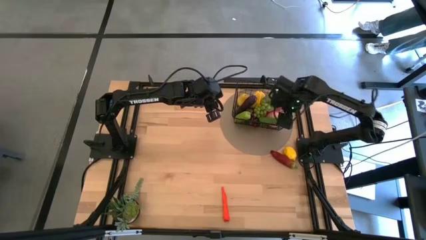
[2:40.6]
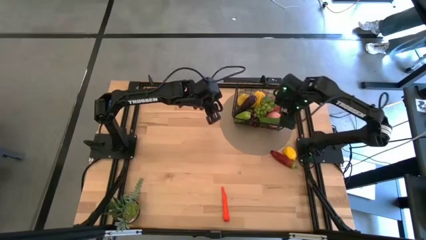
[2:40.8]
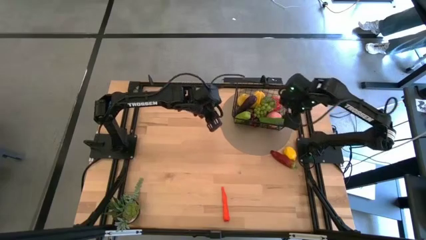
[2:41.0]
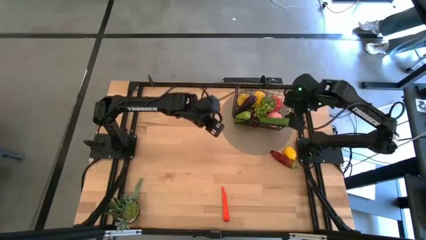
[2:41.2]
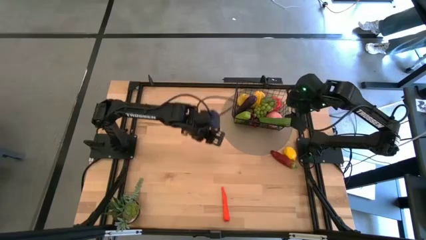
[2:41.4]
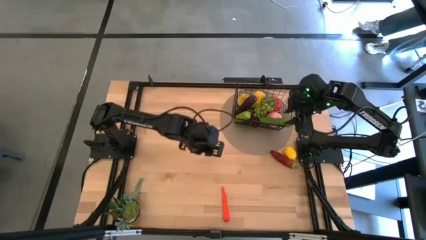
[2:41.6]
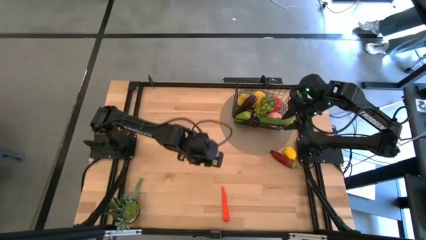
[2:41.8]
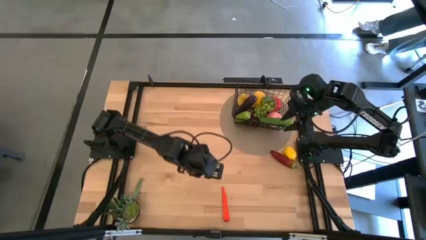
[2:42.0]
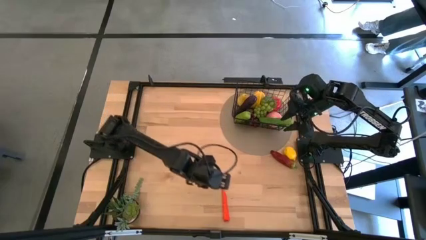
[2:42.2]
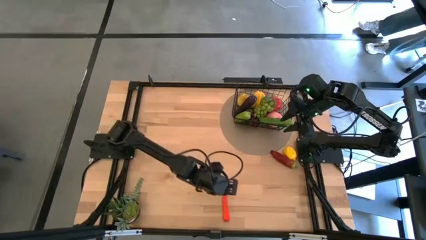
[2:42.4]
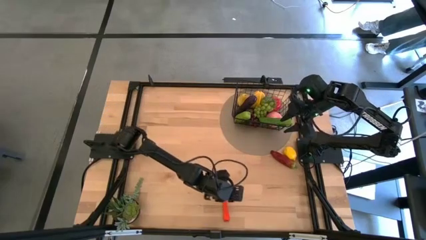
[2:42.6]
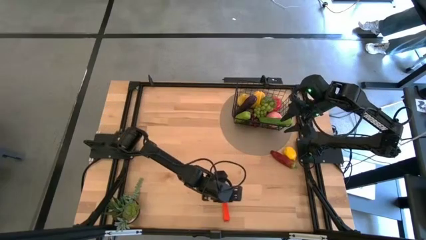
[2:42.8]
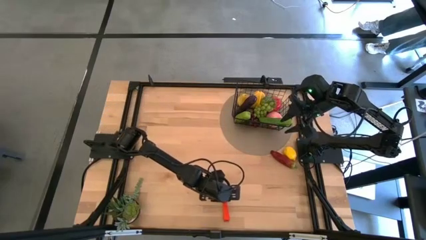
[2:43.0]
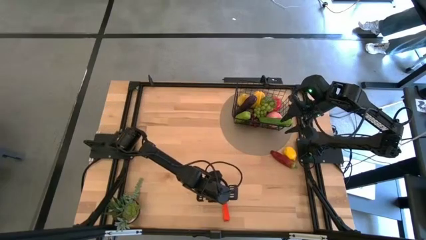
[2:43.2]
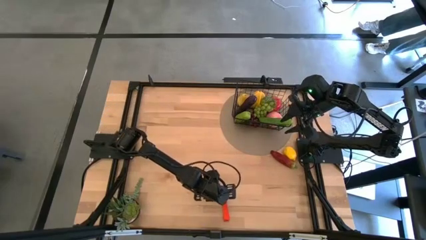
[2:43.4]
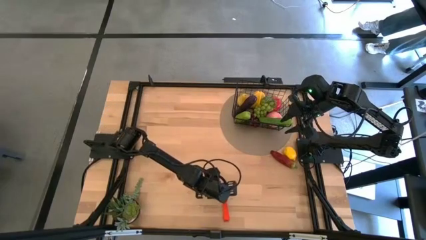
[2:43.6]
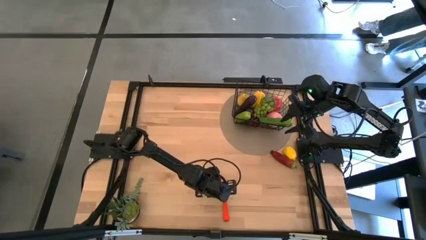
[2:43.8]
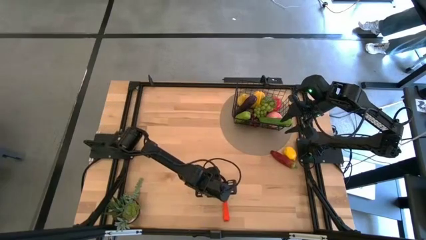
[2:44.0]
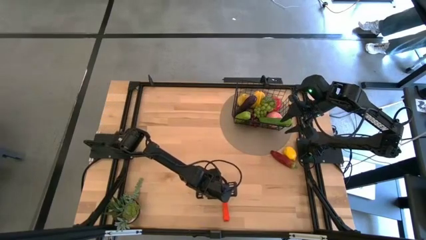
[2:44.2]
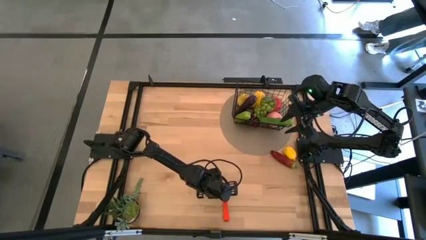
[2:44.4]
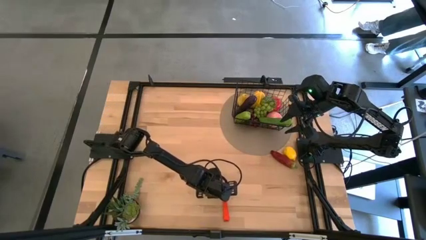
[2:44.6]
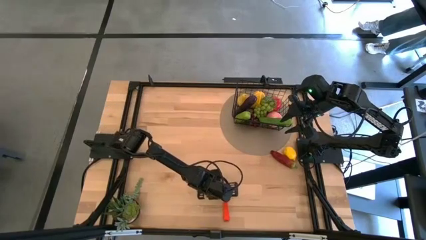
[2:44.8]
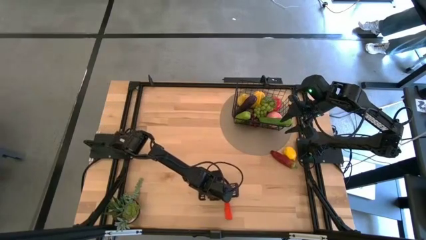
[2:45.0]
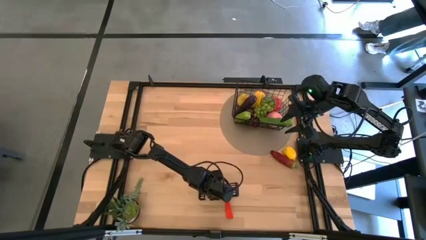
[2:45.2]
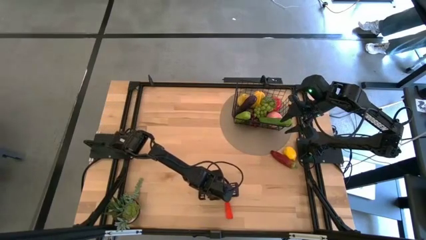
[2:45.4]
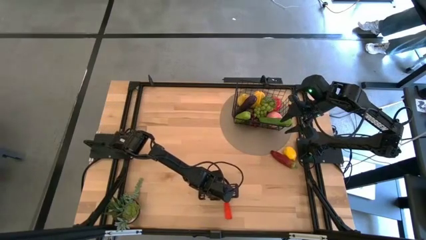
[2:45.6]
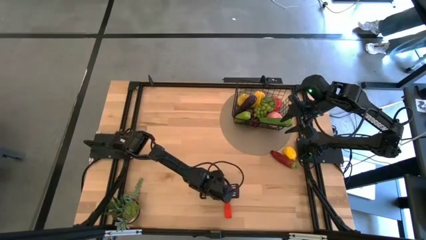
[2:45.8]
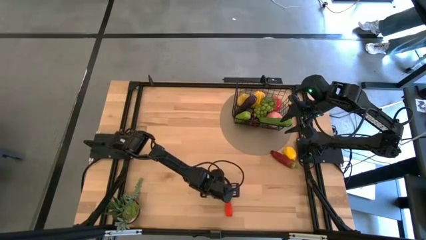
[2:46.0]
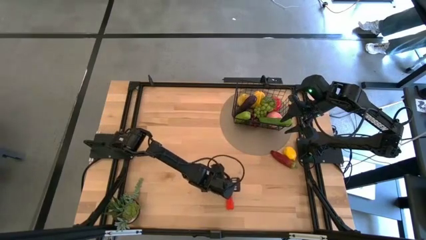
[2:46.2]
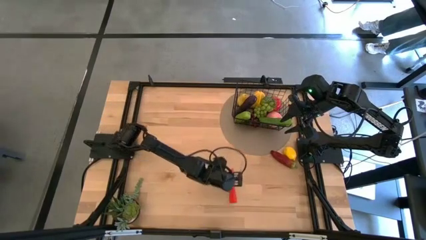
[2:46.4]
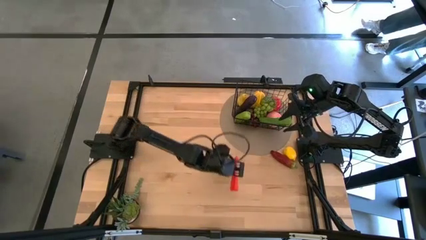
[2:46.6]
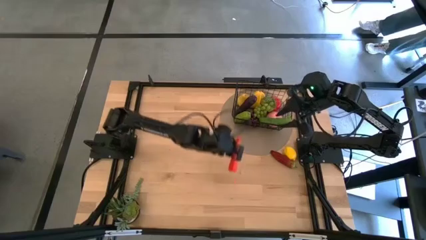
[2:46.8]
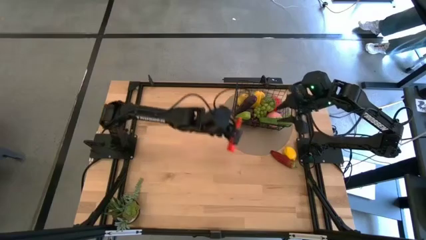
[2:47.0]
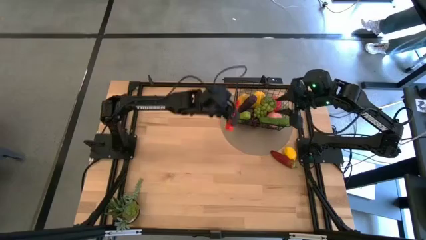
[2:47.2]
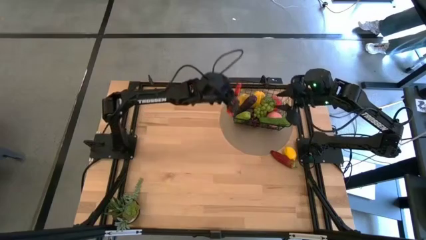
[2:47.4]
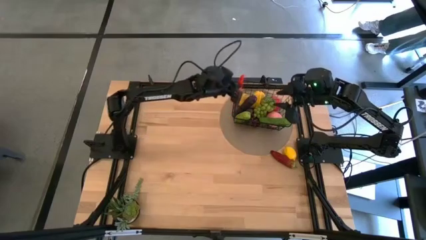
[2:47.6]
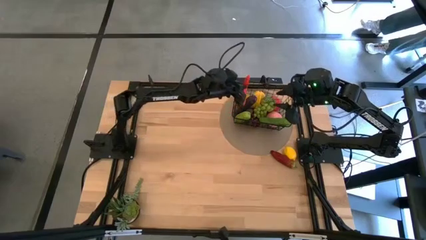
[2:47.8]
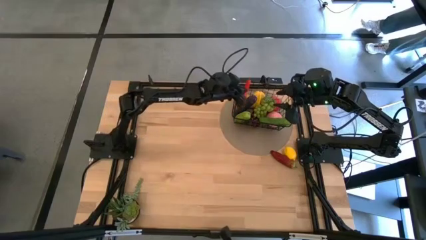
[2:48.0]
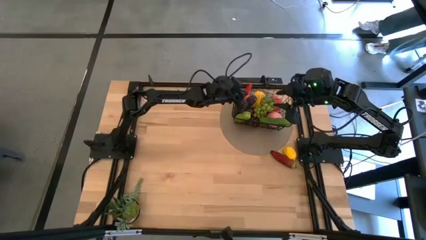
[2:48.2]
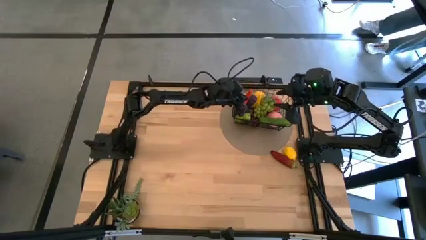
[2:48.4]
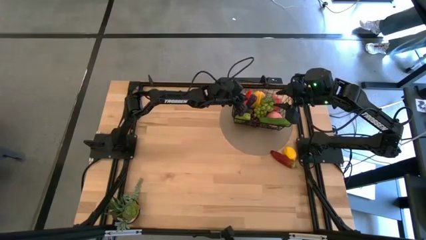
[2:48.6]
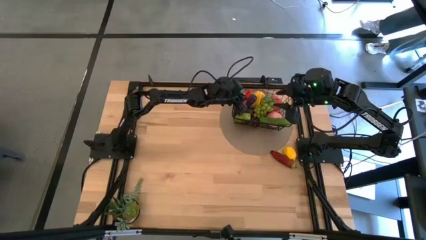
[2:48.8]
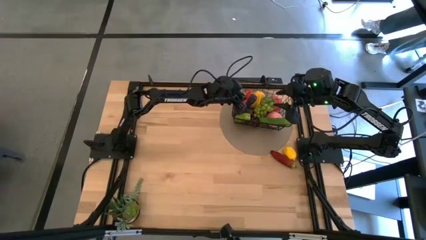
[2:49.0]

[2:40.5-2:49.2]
Task: Build produce basket
Put the orange carrot into the black wire basket

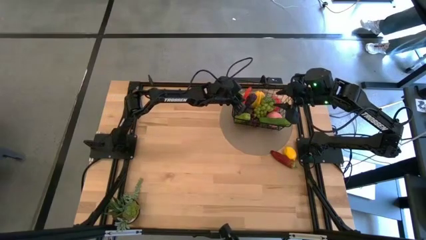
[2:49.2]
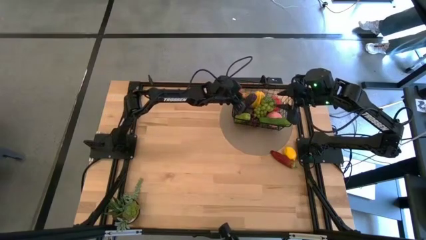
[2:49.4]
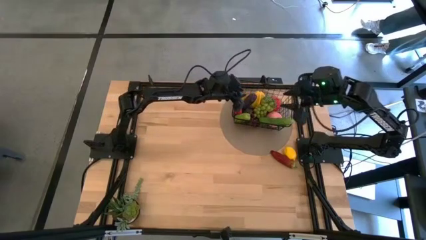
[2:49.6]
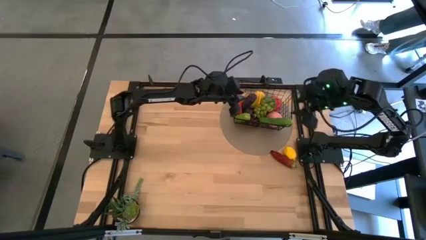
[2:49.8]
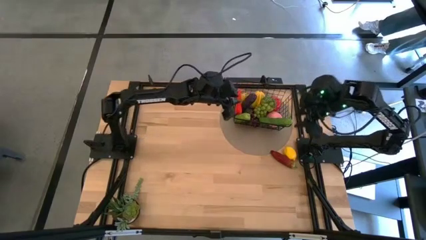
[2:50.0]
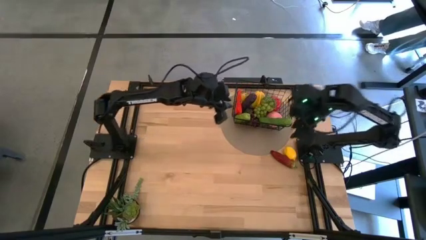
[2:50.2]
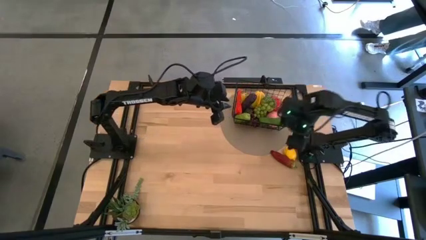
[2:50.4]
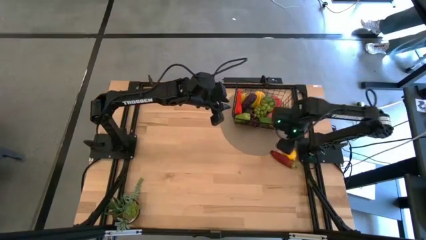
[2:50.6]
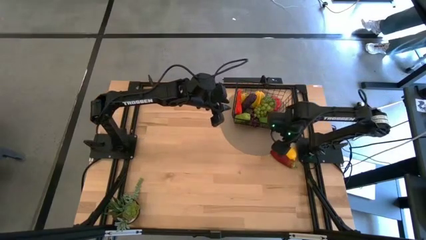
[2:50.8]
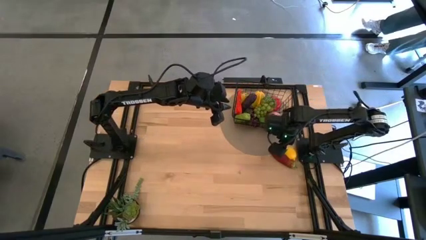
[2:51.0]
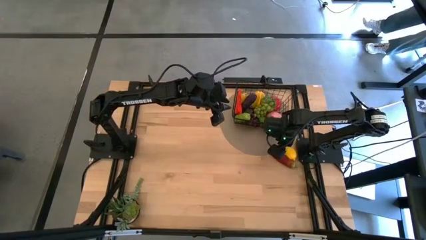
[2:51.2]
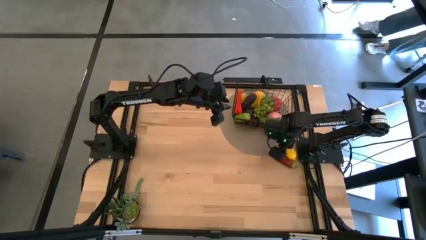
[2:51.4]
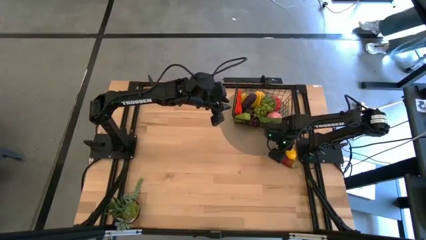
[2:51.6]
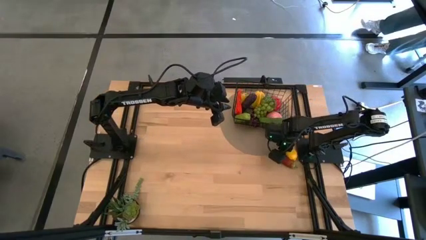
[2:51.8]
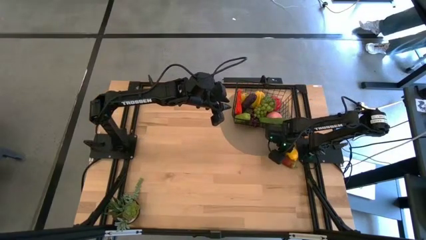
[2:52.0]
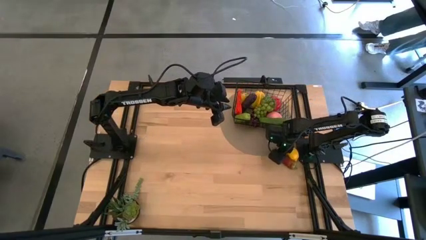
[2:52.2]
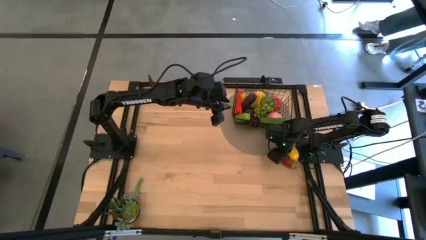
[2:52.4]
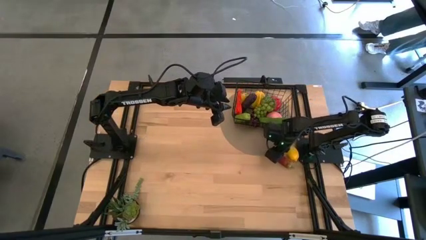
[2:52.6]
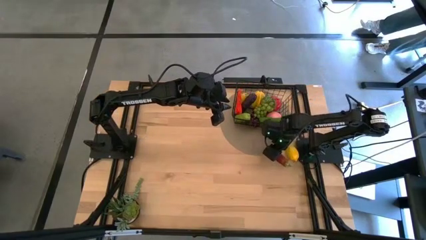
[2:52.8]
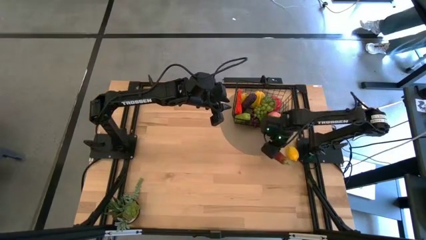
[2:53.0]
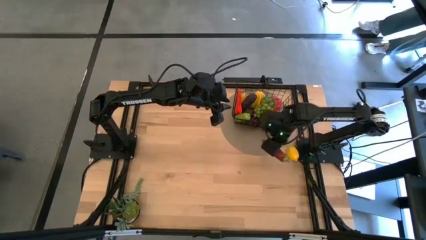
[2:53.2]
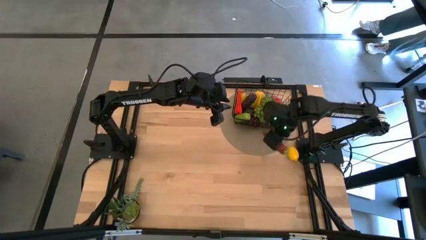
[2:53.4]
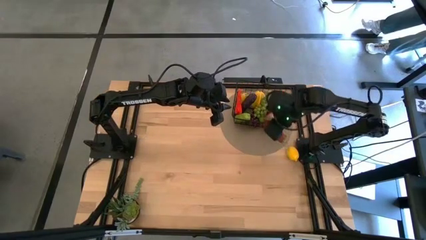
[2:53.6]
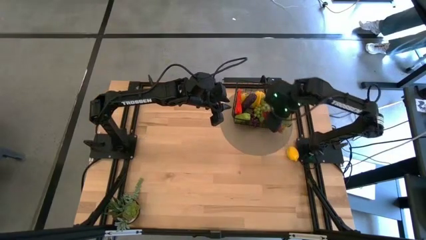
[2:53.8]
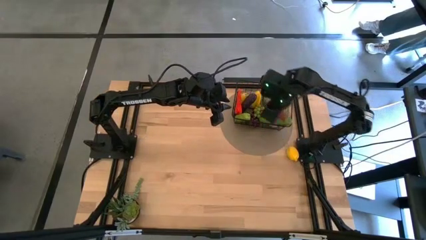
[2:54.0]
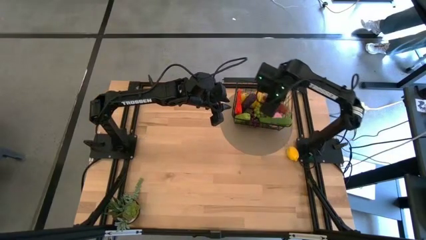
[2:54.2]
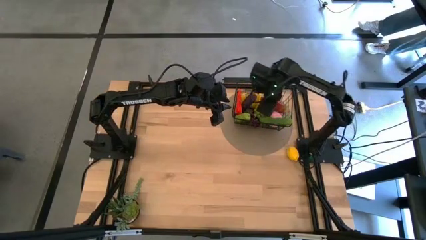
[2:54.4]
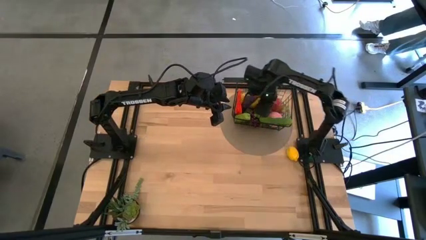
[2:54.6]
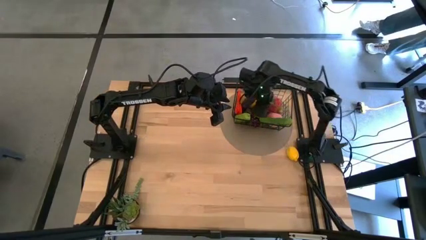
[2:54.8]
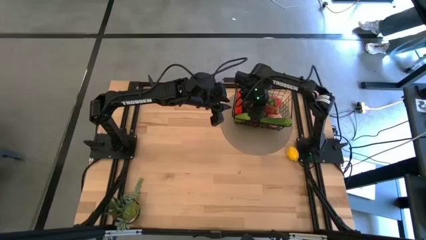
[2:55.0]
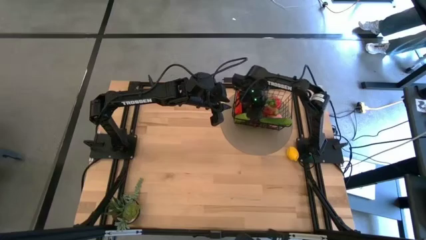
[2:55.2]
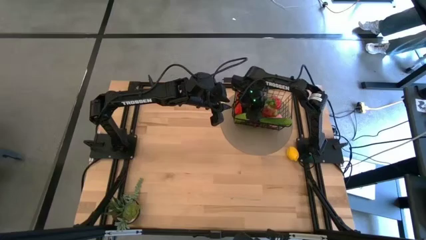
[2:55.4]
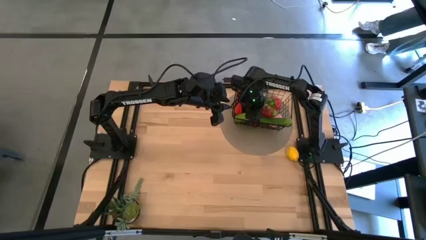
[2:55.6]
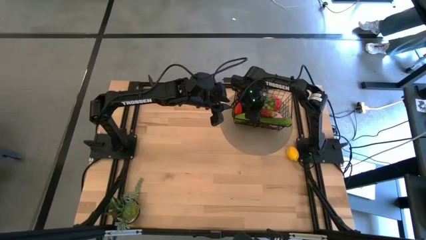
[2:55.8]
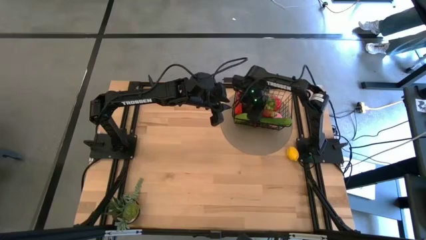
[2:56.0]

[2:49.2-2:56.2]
Put the red chili pepper into the black wire basket
